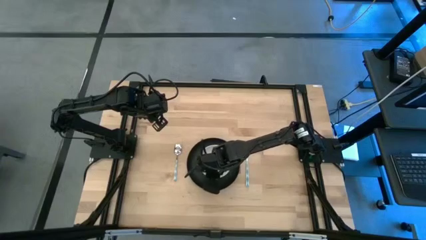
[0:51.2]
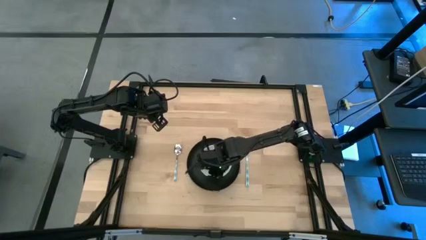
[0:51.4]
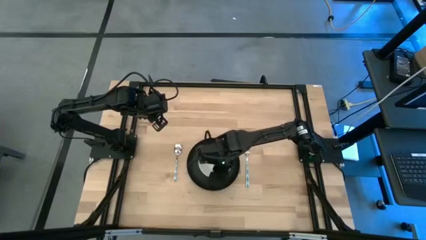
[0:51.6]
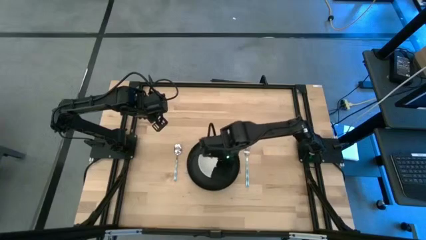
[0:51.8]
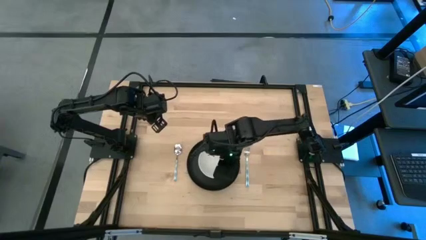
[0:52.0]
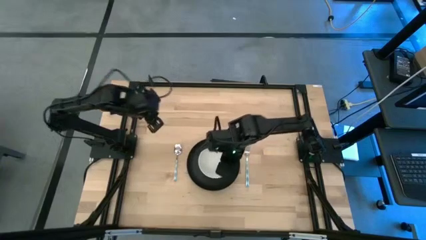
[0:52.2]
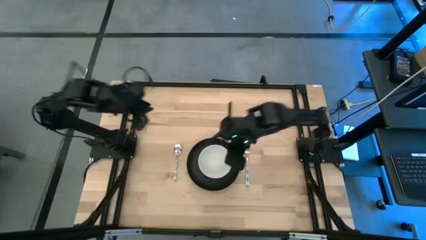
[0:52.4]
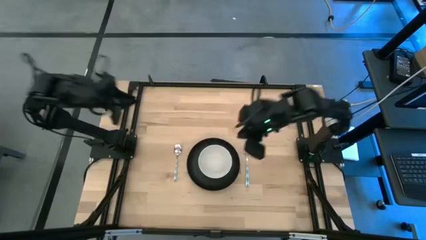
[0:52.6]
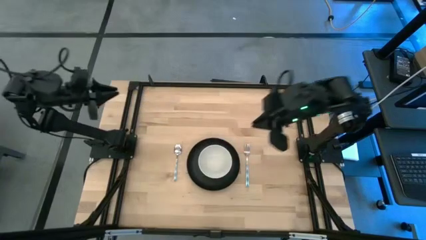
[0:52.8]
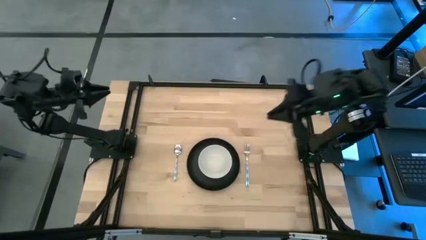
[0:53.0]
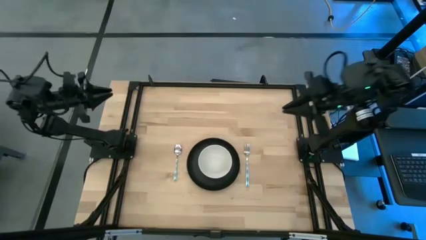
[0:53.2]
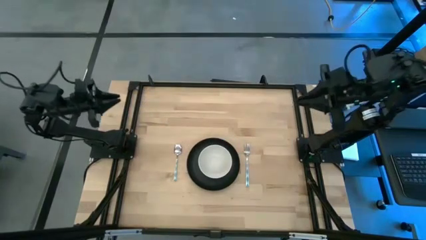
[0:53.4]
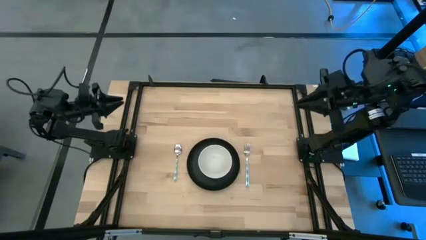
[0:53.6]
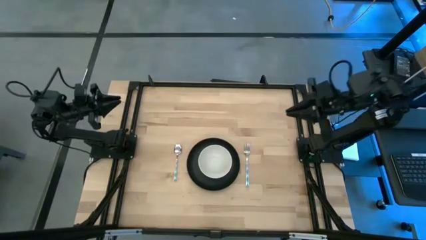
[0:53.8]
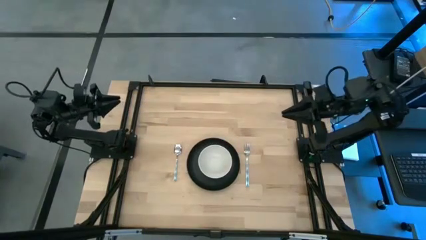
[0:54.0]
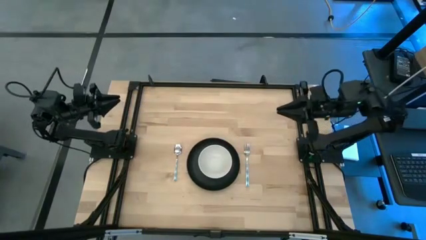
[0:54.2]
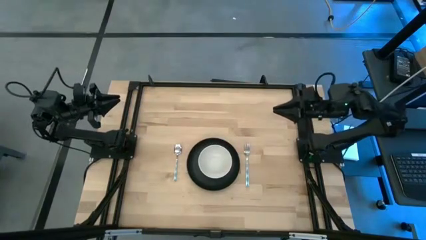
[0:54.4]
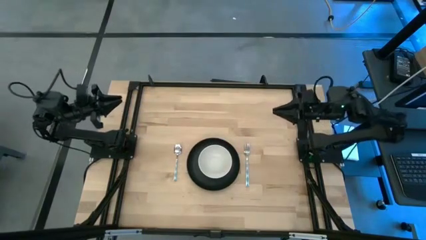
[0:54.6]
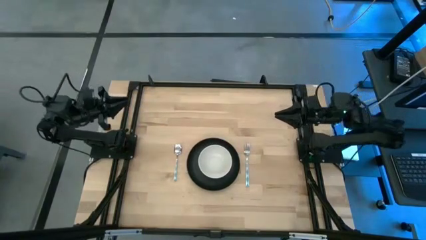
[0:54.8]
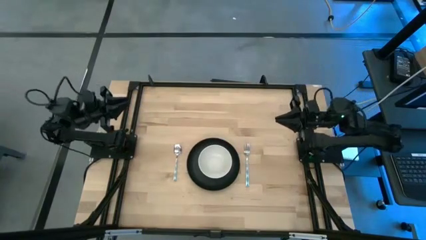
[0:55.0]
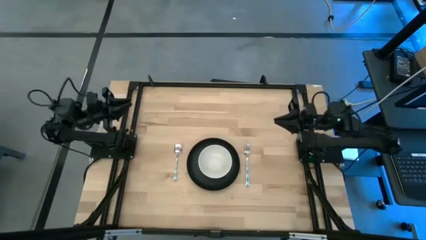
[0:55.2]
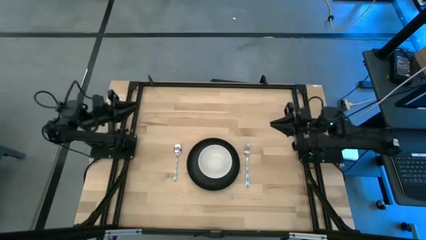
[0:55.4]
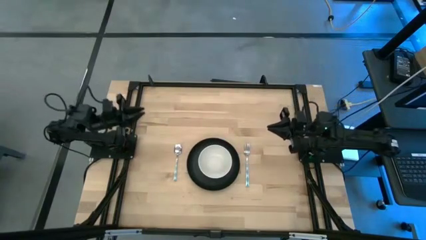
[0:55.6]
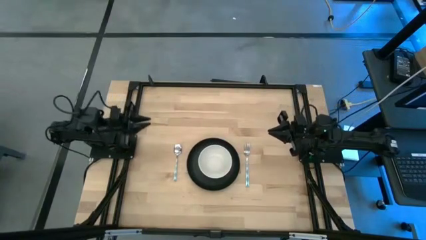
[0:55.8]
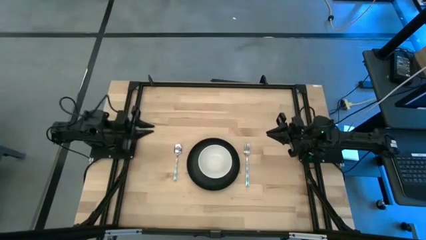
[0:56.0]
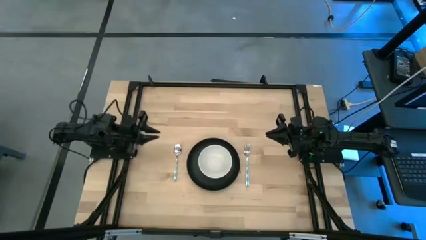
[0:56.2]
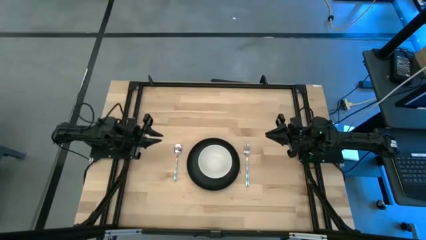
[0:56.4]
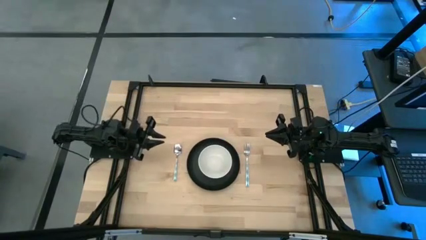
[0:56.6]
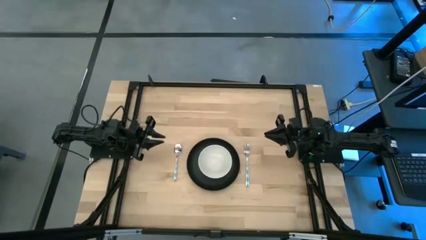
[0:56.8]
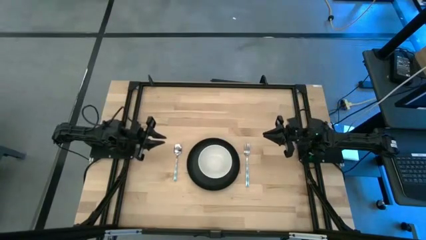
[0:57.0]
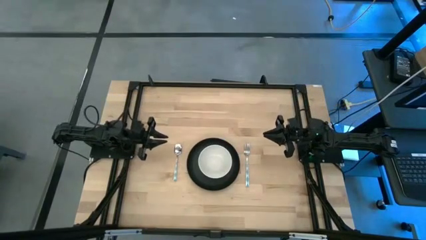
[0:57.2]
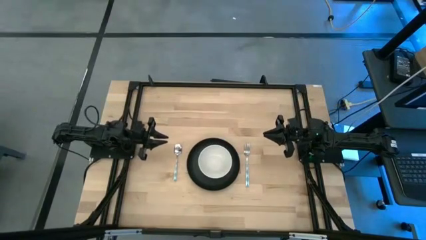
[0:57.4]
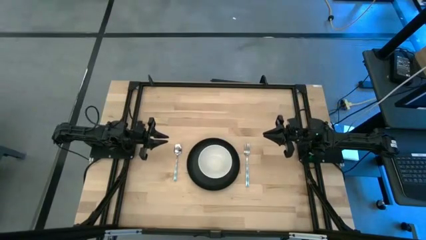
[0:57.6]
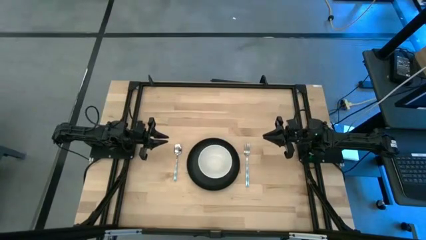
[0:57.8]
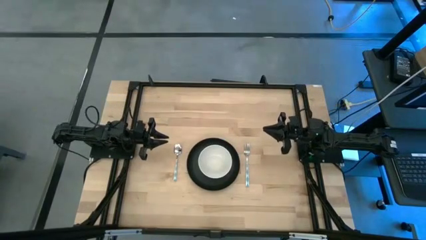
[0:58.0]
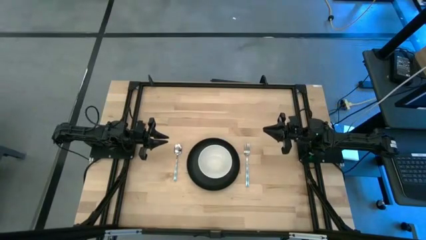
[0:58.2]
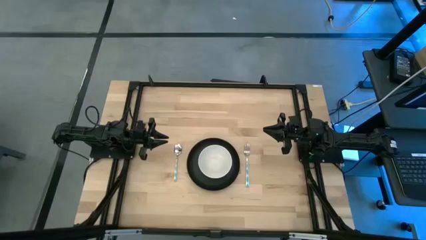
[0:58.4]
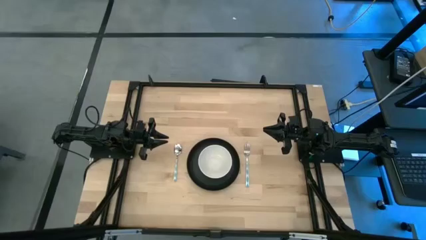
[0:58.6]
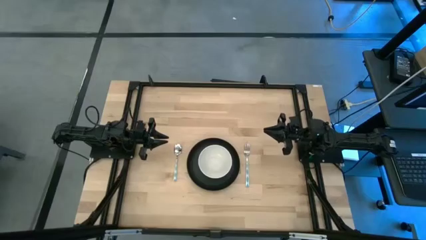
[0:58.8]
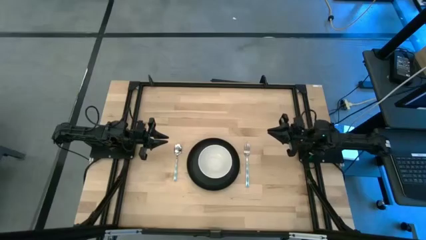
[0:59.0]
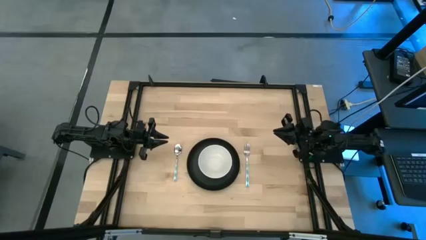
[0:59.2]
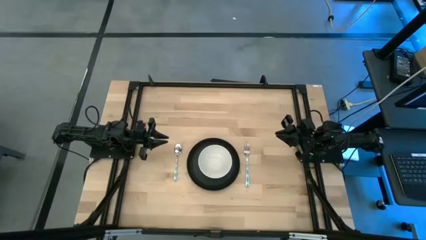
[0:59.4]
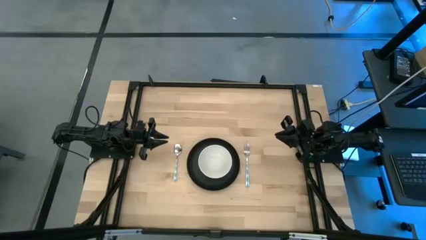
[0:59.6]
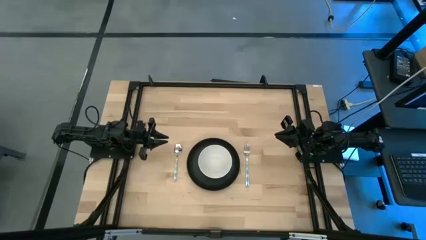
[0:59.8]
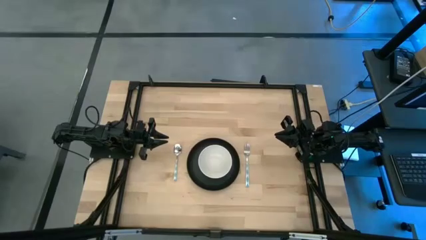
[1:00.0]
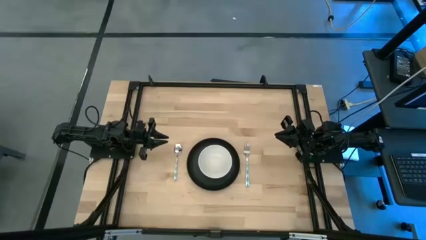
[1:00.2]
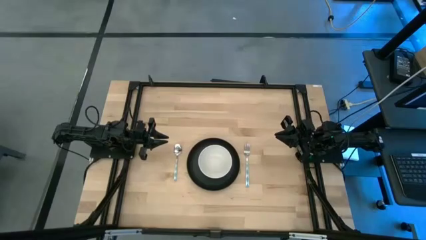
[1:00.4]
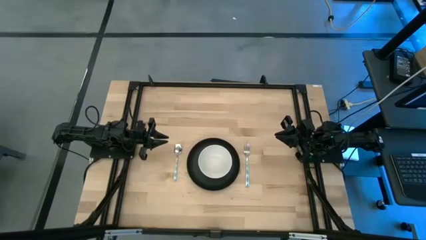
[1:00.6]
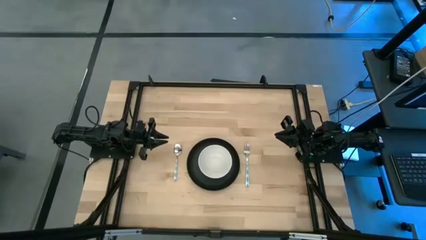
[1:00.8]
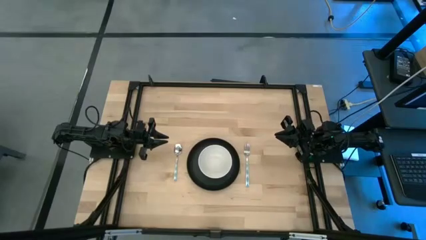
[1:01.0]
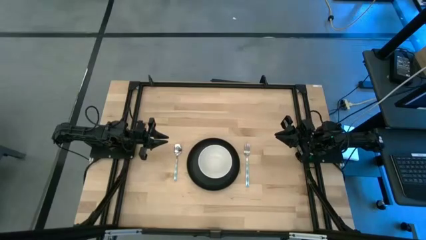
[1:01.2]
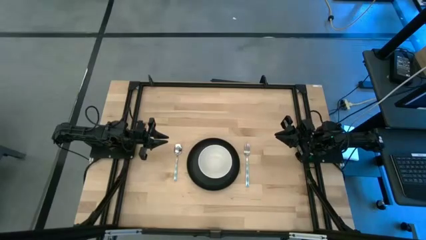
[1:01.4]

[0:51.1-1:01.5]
Task: Set table place
Return to Home Position
